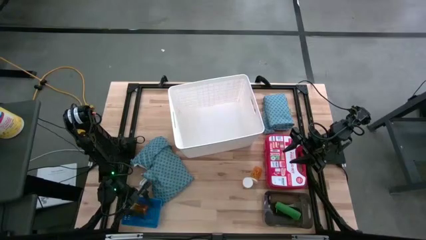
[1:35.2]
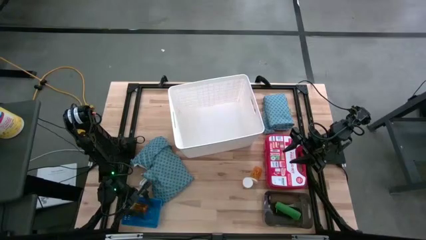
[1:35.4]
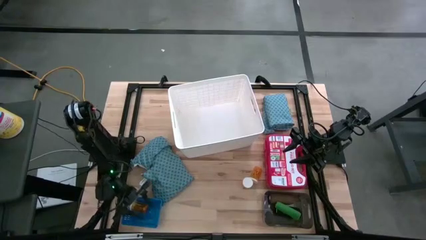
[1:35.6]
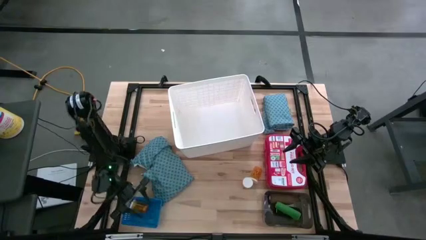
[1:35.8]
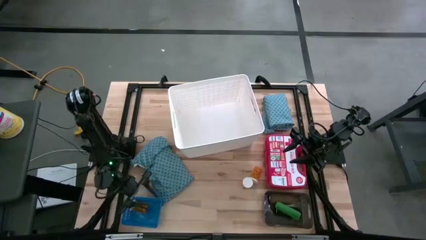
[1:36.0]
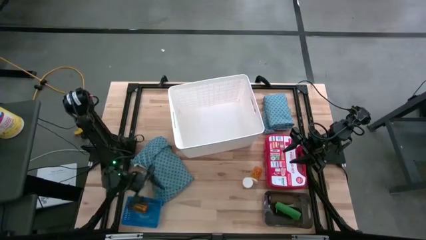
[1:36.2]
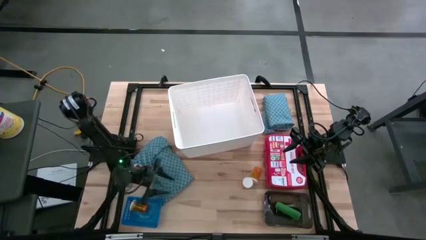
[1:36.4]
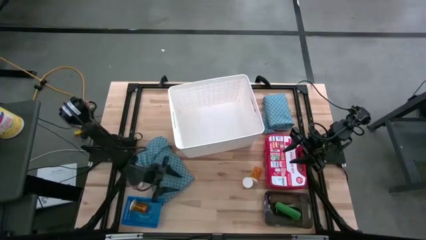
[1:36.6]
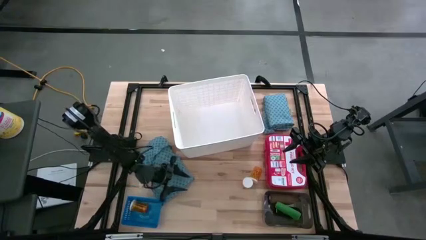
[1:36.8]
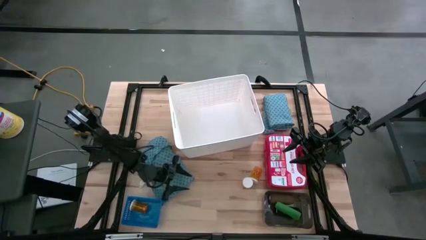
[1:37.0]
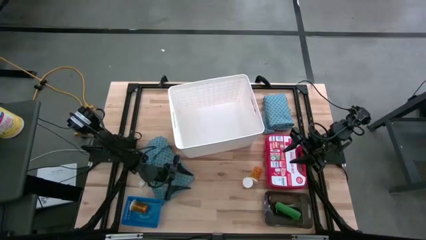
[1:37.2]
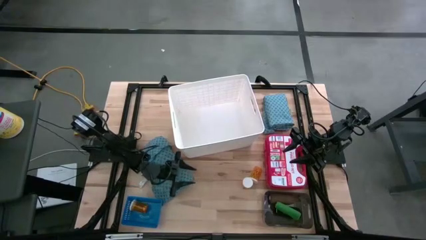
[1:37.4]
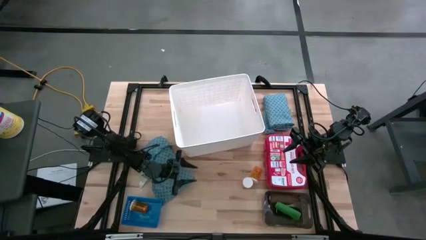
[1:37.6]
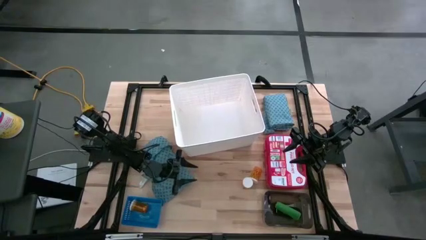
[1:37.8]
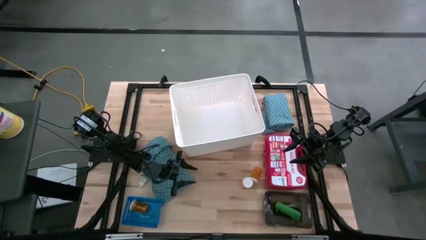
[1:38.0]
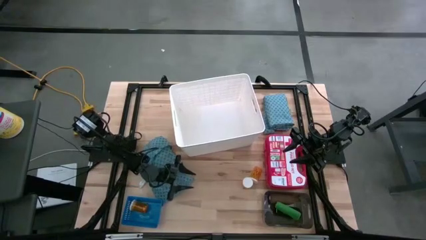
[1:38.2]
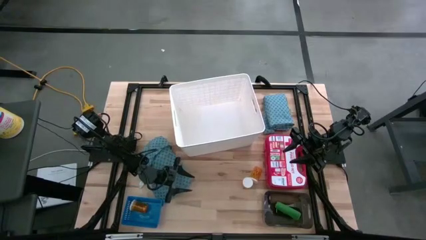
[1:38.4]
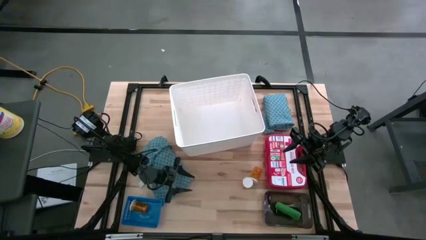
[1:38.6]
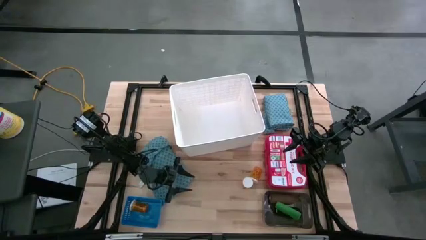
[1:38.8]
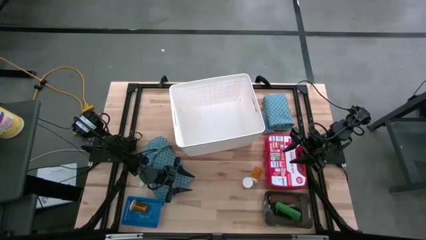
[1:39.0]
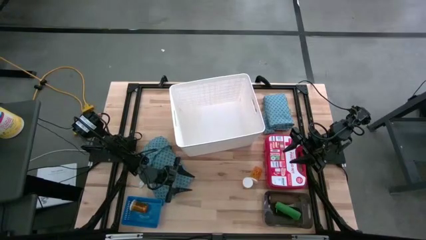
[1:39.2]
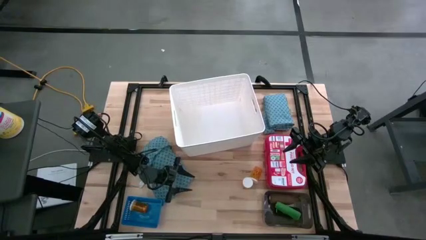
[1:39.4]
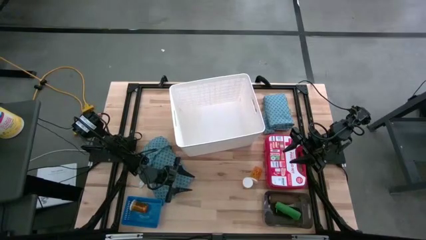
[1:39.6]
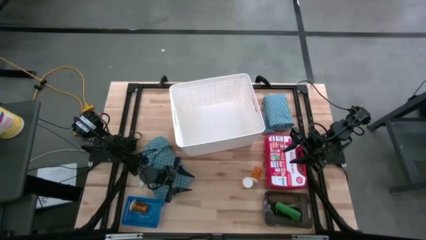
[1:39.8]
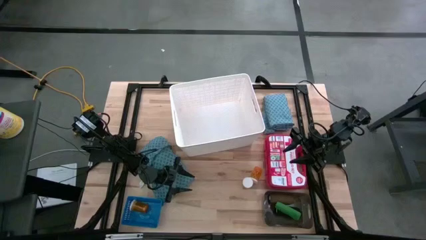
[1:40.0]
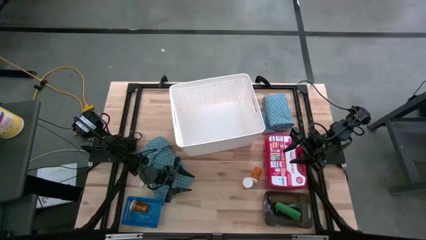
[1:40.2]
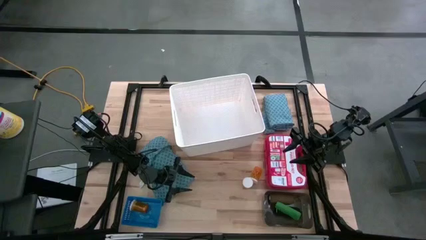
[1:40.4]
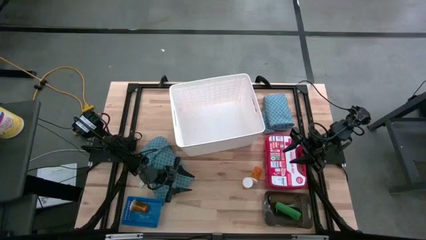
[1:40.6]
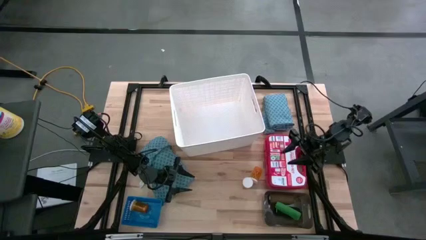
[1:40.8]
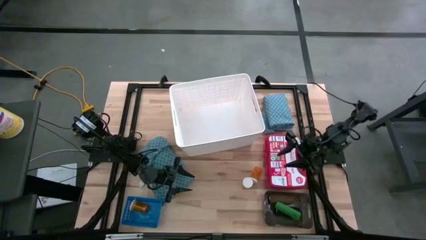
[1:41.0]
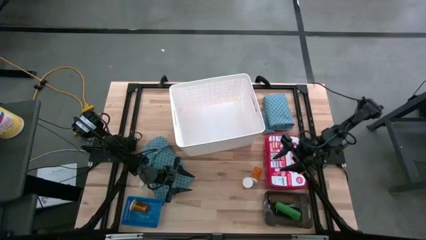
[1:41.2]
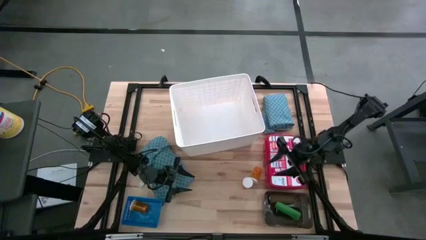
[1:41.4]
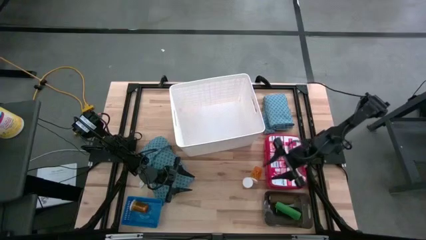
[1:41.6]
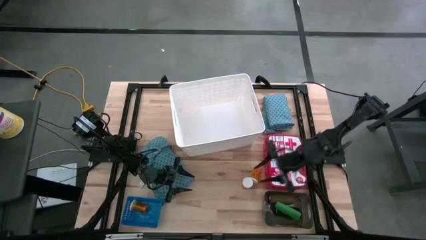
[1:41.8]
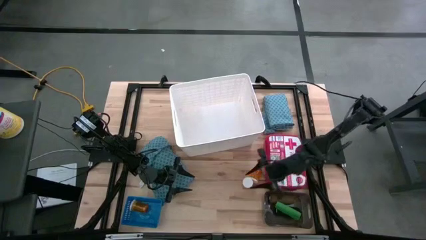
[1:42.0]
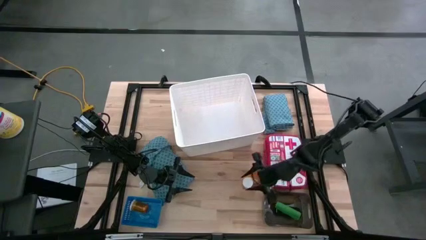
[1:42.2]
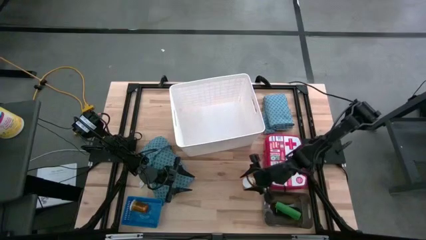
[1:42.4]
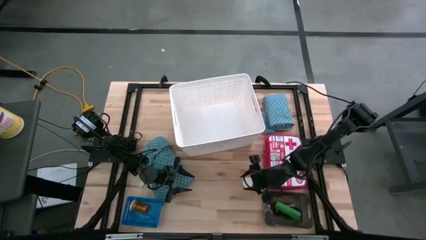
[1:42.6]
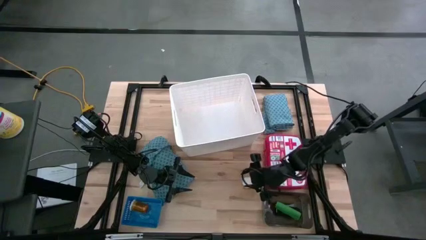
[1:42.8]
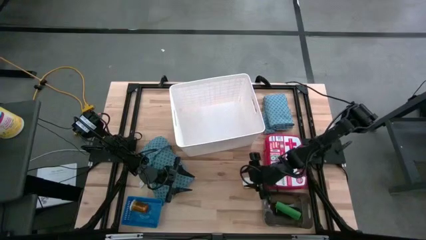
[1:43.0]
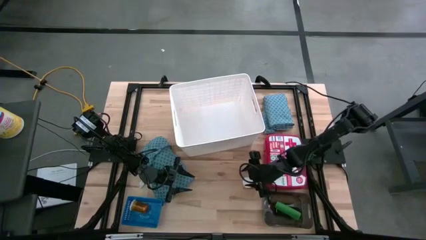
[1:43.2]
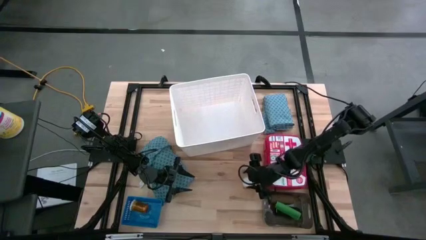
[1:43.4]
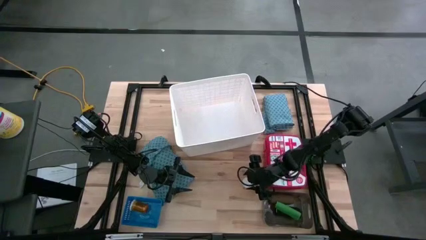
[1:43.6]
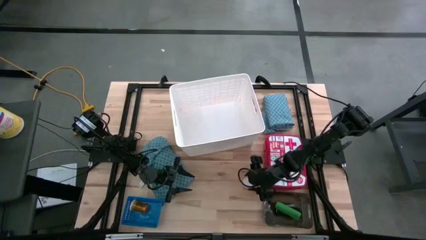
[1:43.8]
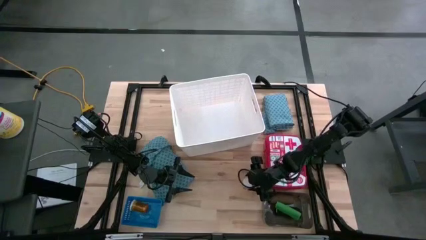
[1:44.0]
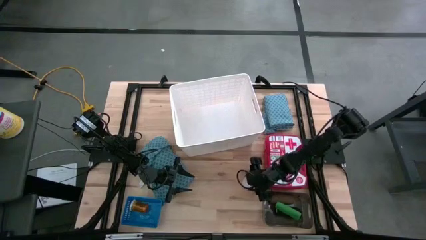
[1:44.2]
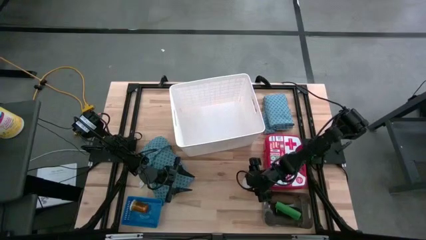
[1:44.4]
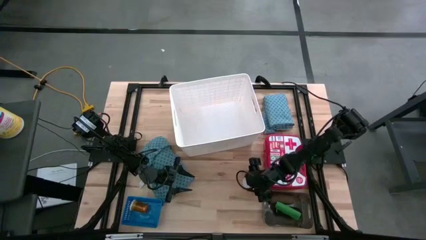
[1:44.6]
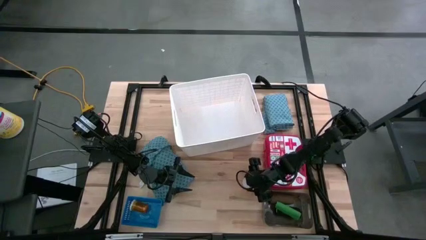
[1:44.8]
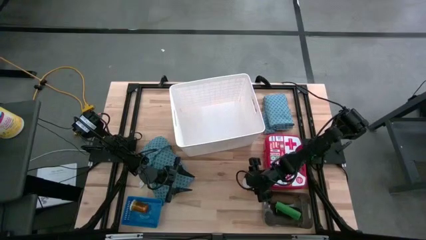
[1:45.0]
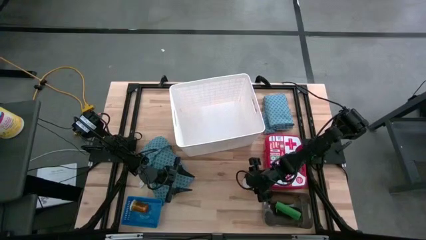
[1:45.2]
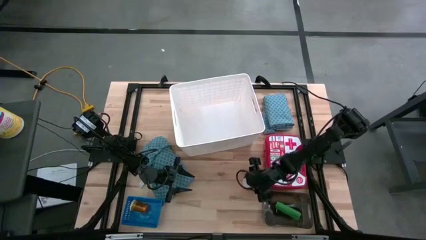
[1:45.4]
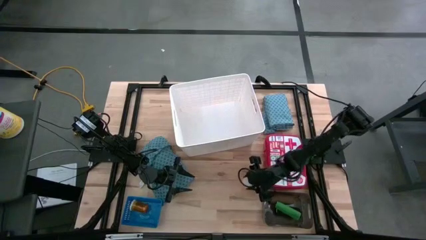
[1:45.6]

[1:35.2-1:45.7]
Task: Pick & place medical supplies in basket/bin
Put the bottom orange pill bottle into the blue bin

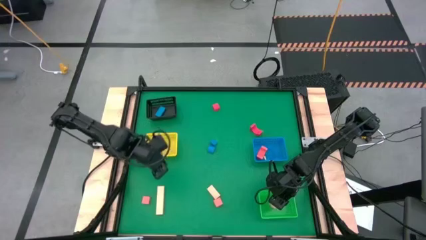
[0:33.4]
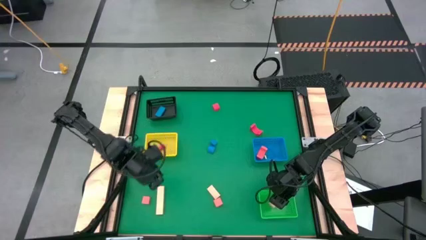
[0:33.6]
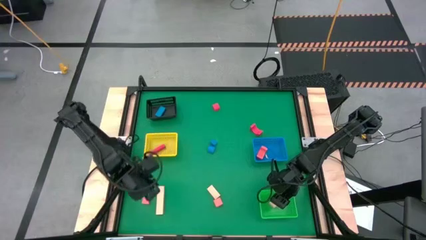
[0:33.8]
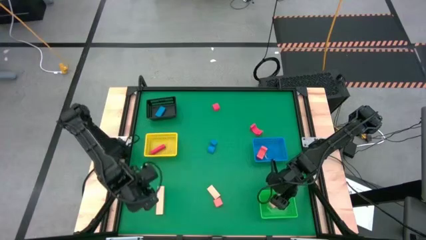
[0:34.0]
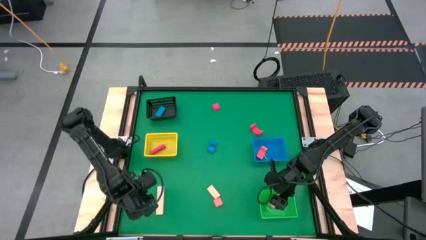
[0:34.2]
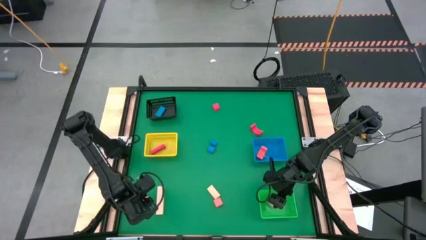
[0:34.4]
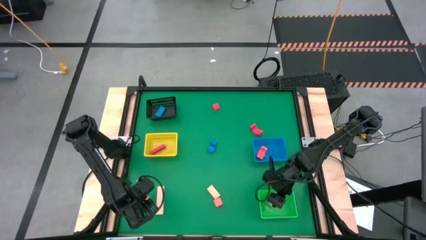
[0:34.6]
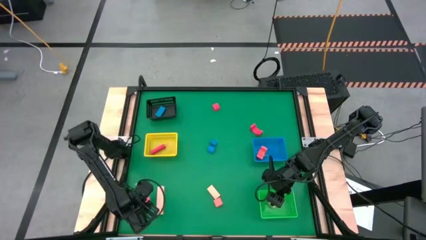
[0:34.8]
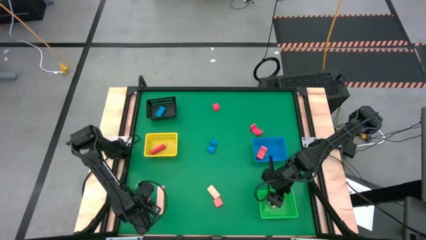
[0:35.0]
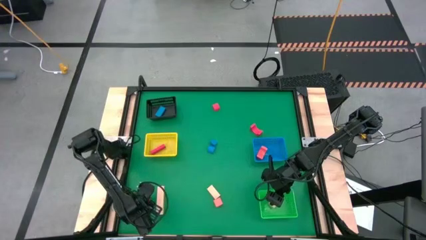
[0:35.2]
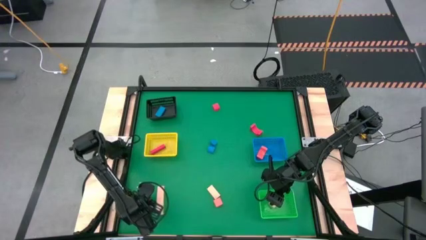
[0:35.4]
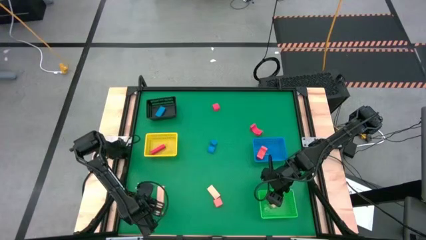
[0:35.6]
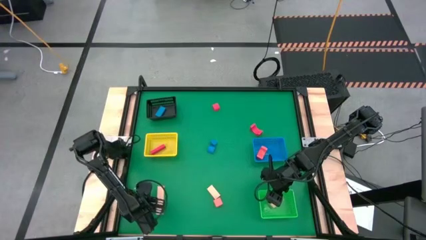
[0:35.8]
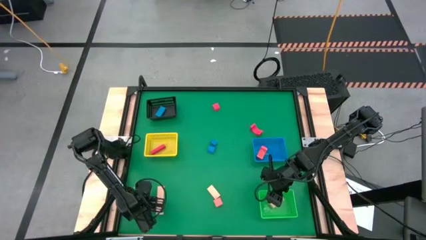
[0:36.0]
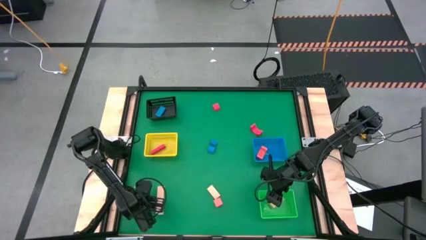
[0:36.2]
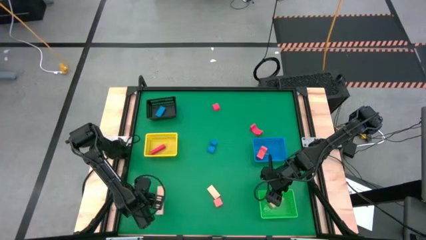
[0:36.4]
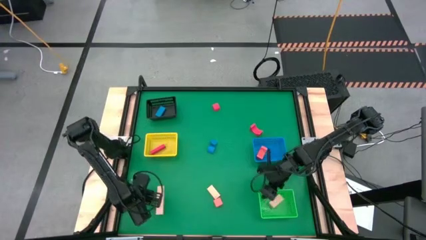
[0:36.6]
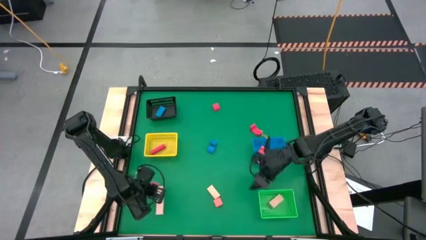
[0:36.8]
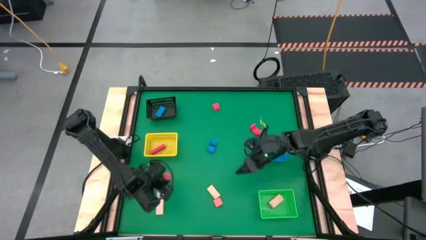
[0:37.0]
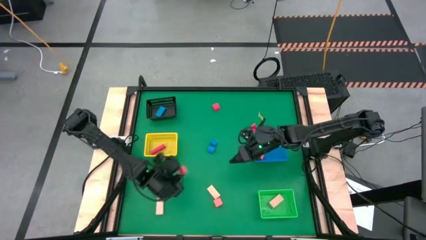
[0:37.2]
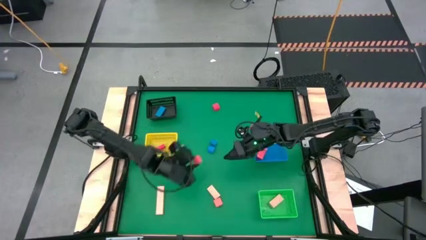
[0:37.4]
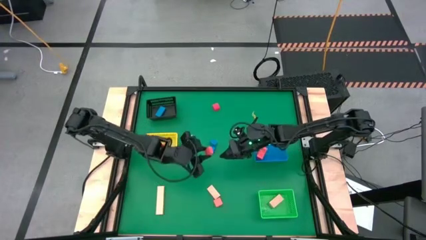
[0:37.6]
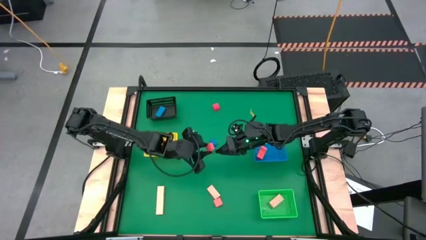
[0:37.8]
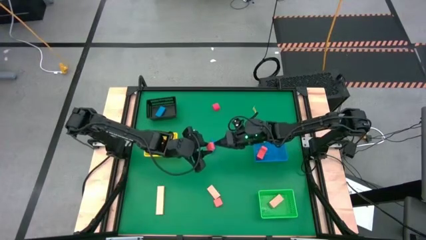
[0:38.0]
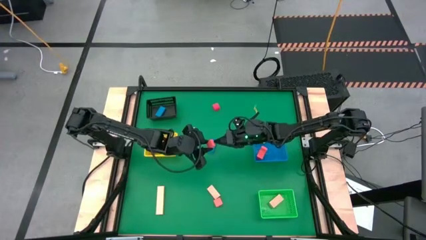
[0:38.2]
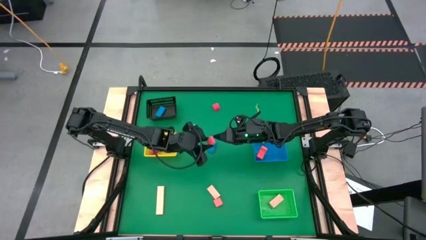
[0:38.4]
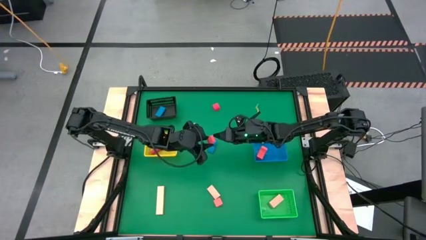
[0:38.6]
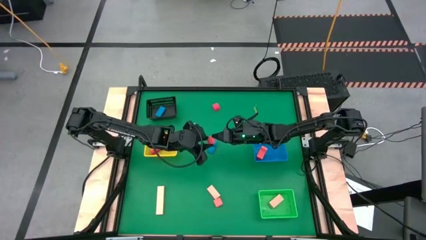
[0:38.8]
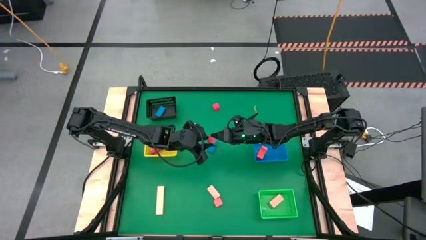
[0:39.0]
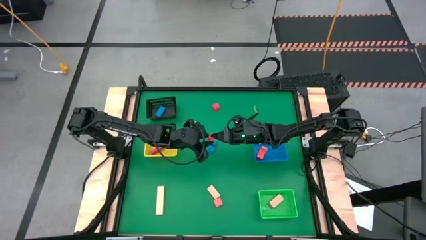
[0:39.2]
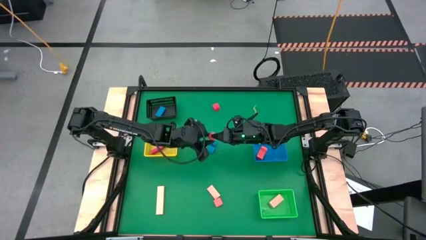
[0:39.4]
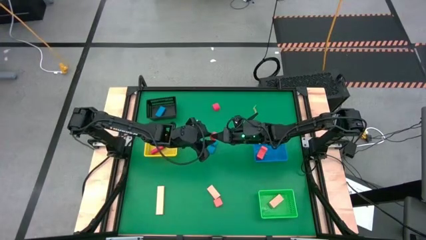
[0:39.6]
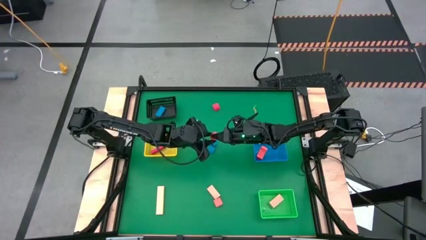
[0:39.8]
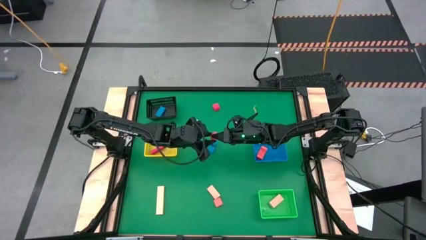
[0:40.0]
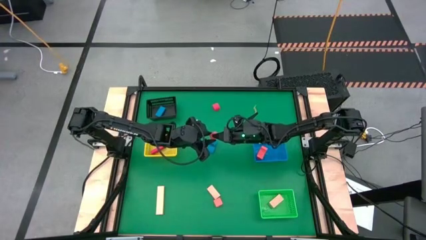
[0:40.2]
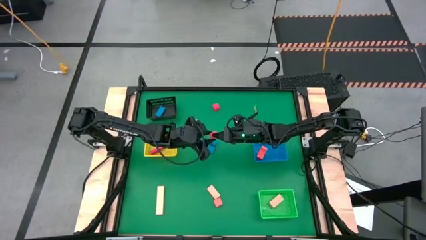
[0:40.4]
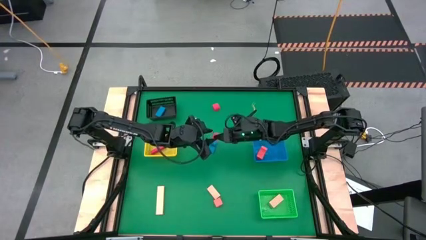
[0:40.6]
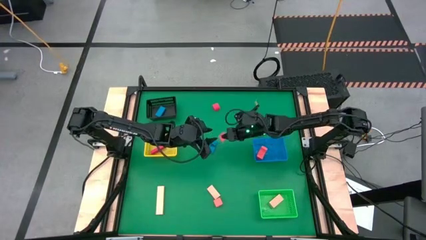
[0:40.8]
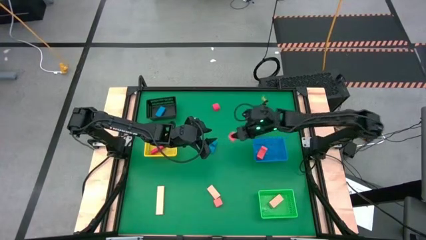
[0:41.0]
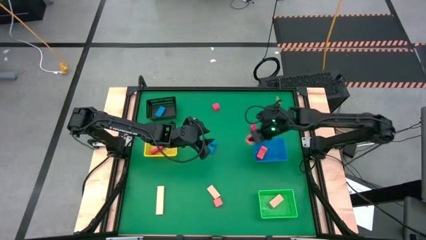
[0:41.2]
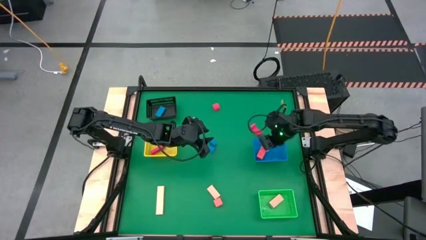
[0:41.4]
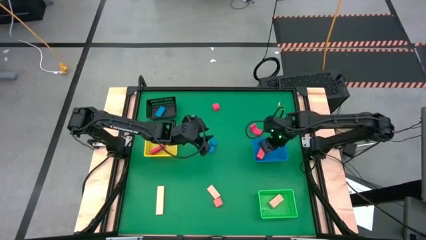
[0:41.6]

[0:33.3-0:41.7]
Task: Sort & place blocks by color
Put the left orange block into the blue bin
